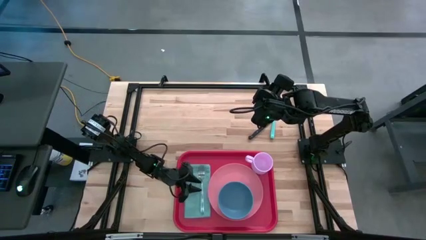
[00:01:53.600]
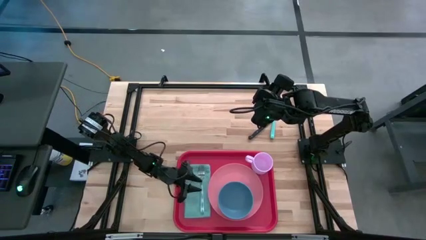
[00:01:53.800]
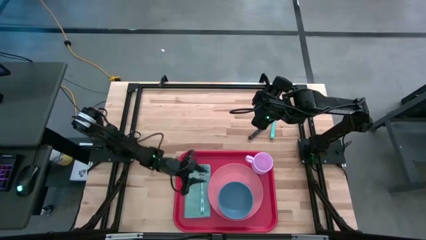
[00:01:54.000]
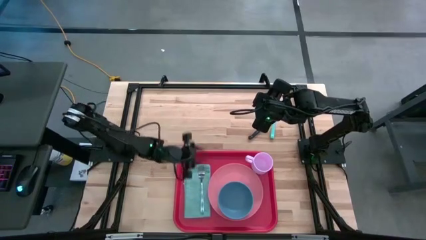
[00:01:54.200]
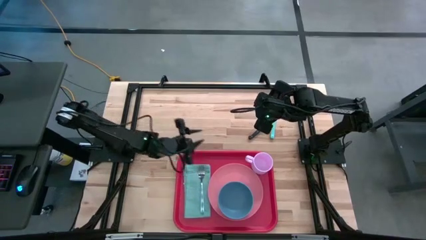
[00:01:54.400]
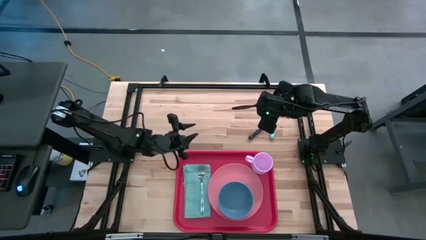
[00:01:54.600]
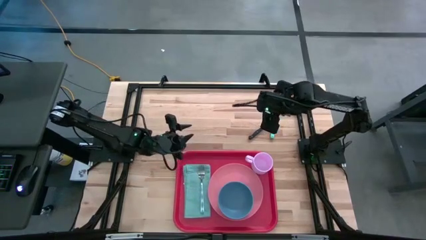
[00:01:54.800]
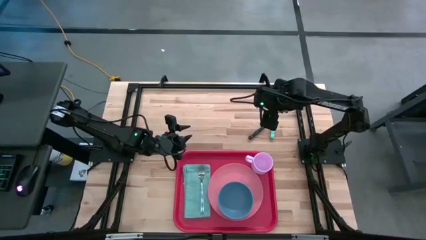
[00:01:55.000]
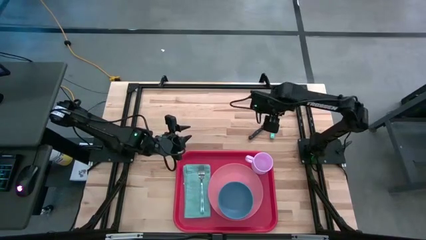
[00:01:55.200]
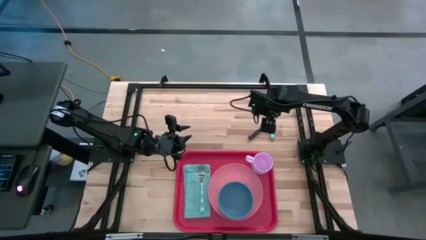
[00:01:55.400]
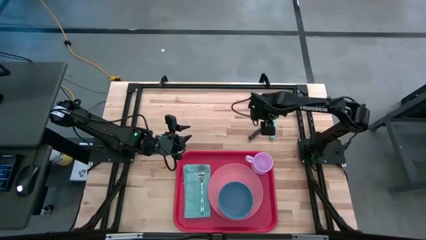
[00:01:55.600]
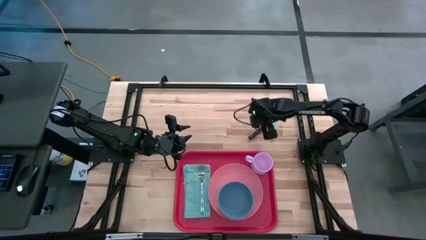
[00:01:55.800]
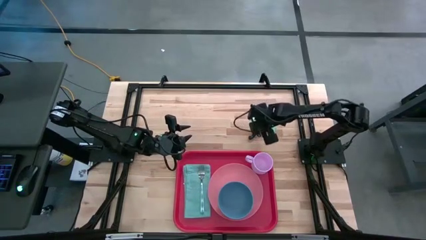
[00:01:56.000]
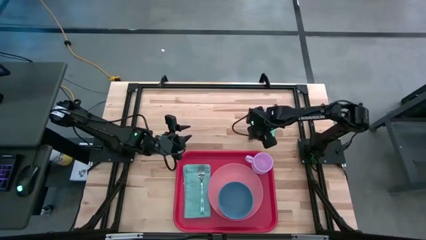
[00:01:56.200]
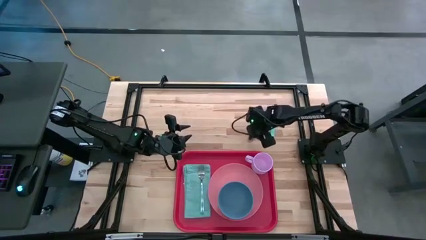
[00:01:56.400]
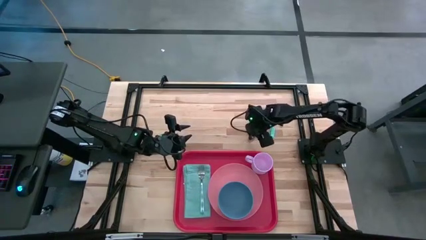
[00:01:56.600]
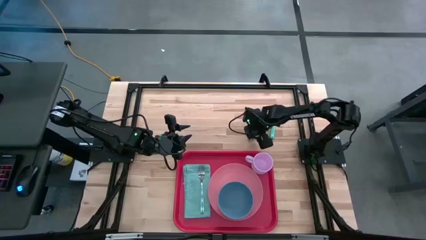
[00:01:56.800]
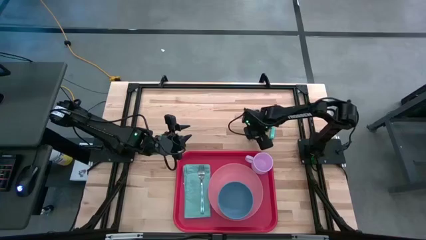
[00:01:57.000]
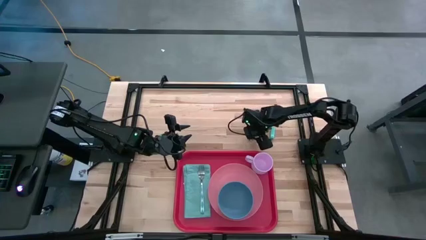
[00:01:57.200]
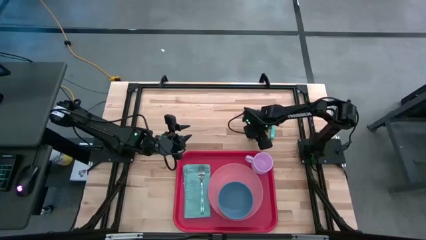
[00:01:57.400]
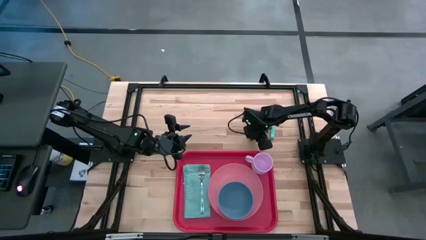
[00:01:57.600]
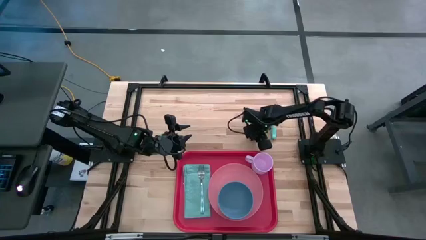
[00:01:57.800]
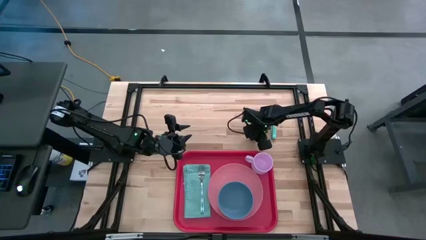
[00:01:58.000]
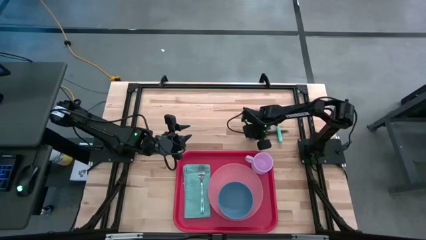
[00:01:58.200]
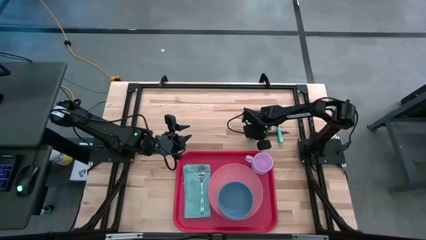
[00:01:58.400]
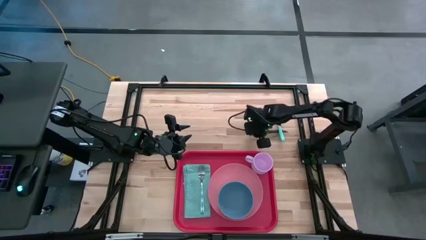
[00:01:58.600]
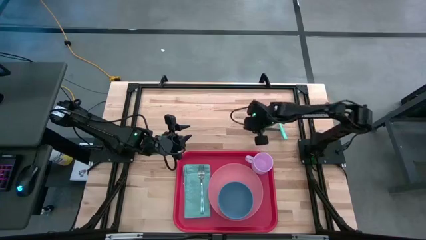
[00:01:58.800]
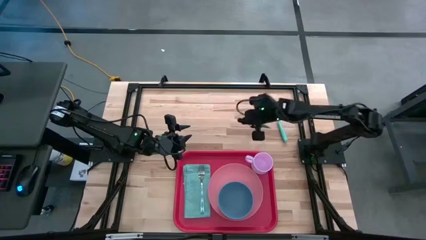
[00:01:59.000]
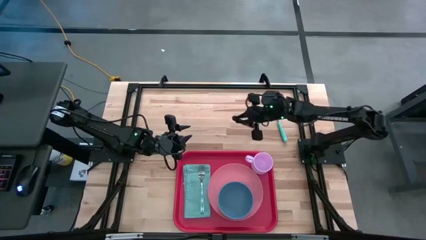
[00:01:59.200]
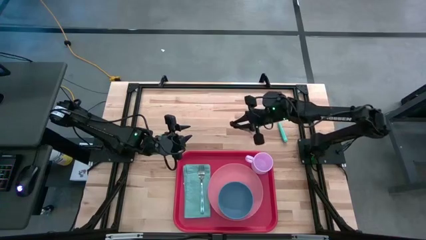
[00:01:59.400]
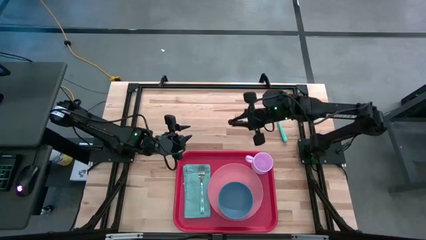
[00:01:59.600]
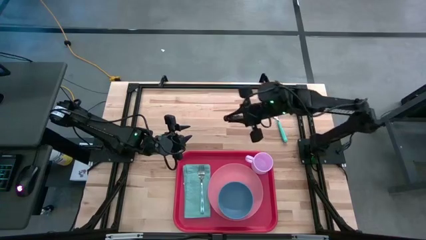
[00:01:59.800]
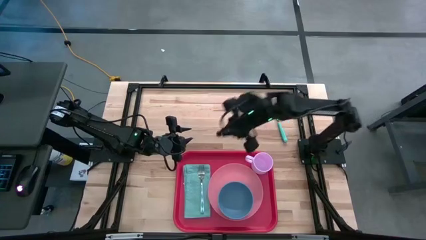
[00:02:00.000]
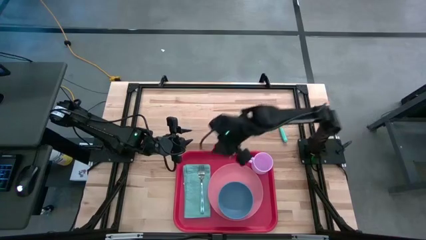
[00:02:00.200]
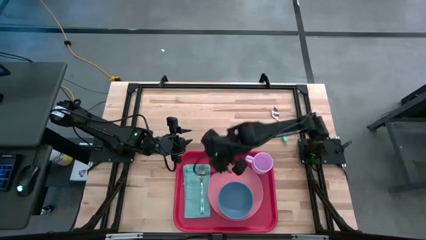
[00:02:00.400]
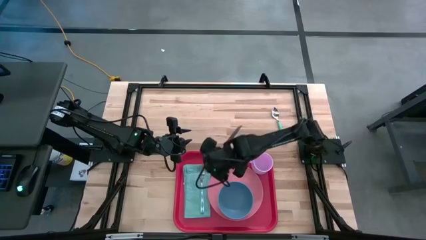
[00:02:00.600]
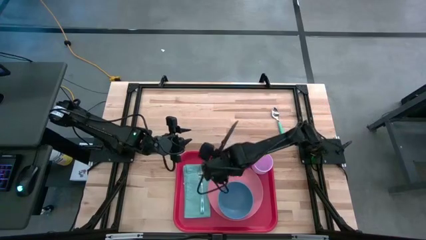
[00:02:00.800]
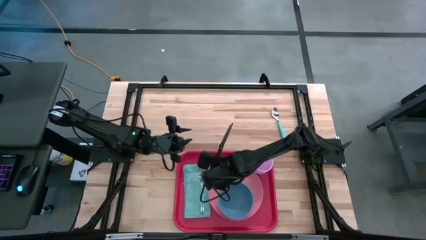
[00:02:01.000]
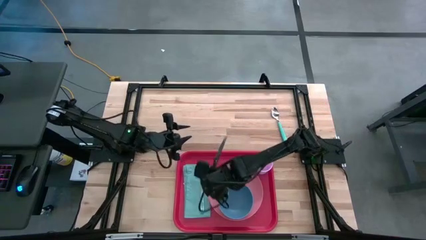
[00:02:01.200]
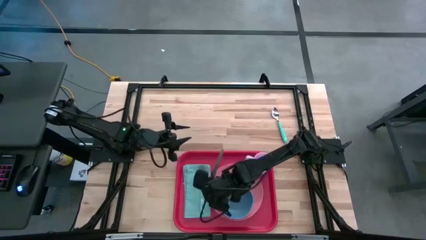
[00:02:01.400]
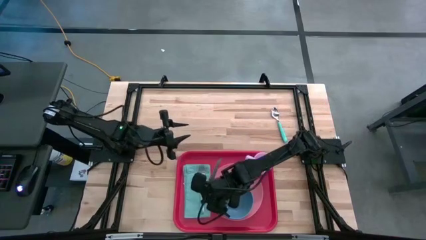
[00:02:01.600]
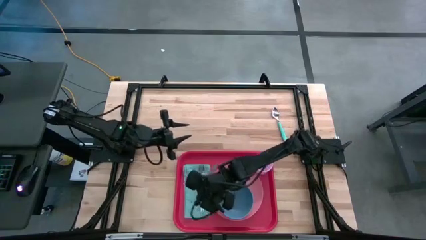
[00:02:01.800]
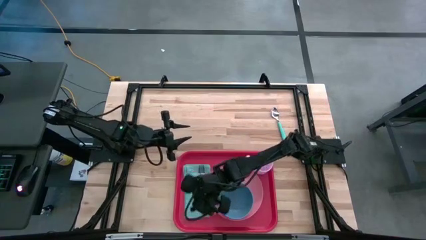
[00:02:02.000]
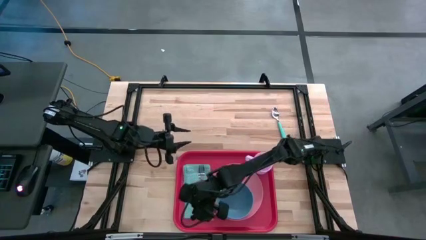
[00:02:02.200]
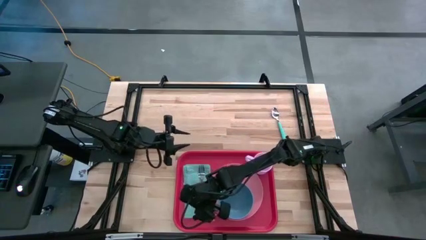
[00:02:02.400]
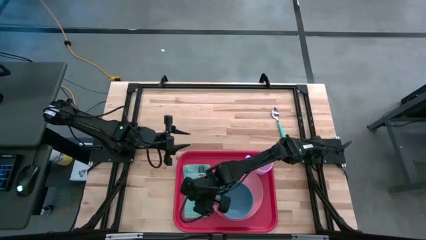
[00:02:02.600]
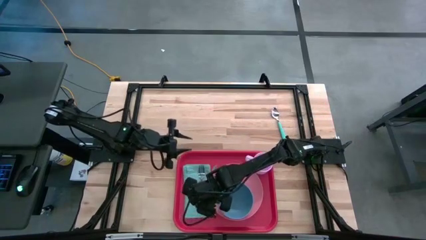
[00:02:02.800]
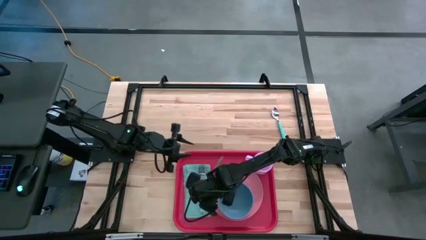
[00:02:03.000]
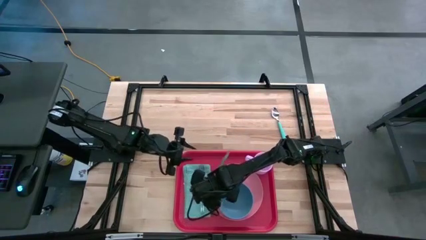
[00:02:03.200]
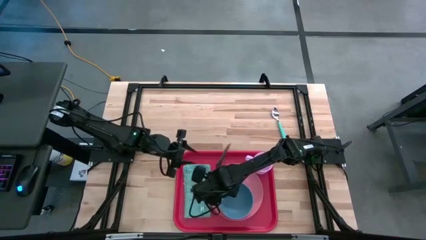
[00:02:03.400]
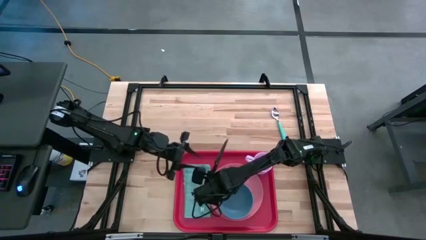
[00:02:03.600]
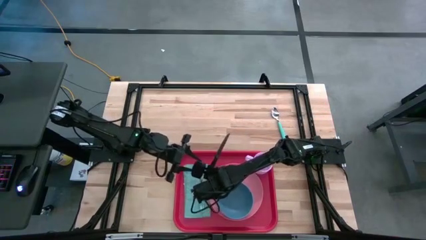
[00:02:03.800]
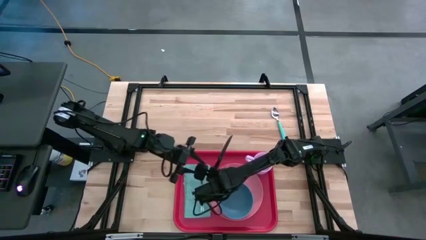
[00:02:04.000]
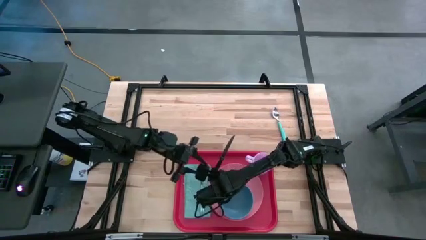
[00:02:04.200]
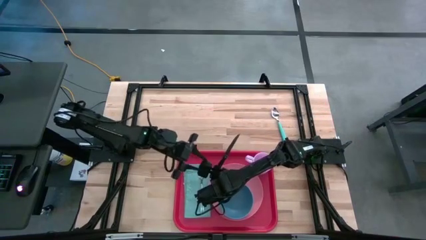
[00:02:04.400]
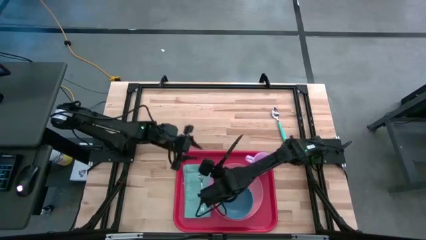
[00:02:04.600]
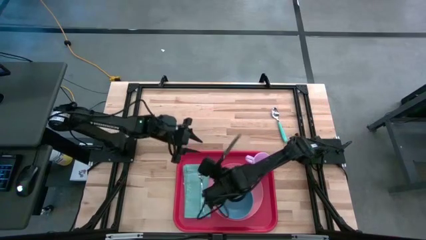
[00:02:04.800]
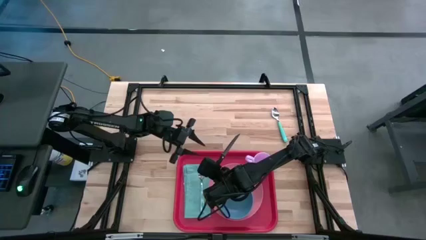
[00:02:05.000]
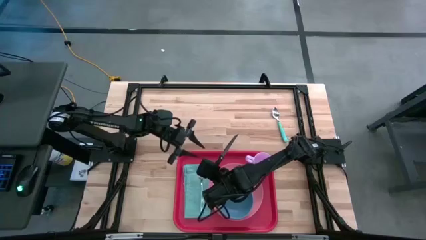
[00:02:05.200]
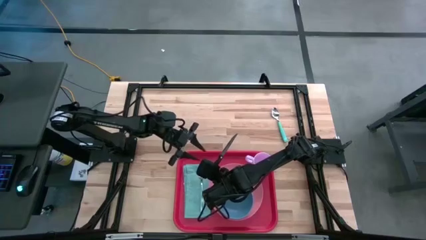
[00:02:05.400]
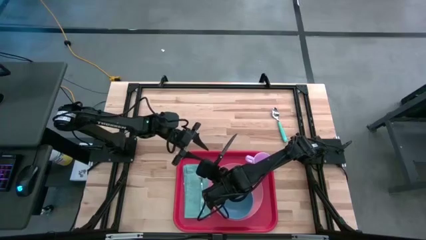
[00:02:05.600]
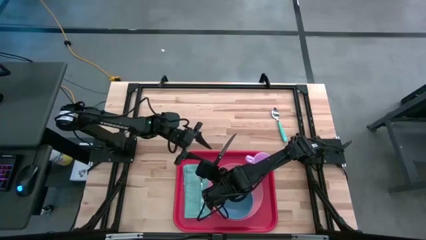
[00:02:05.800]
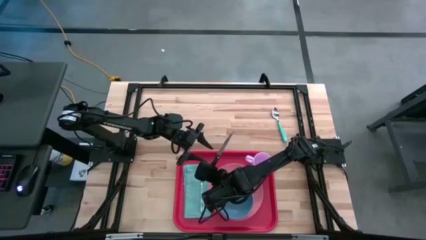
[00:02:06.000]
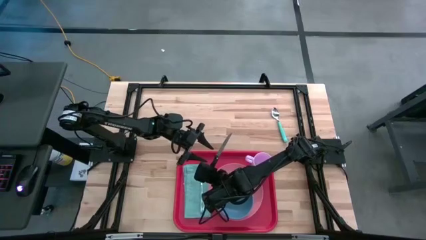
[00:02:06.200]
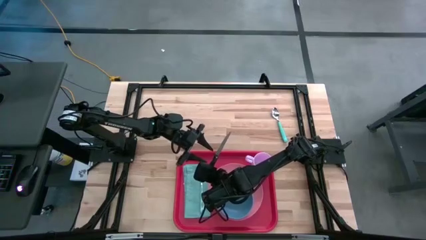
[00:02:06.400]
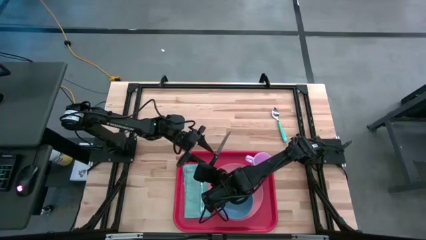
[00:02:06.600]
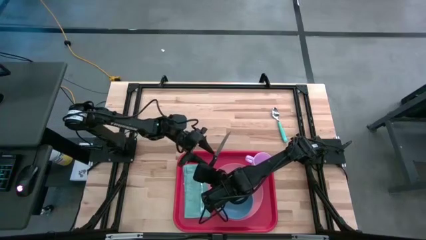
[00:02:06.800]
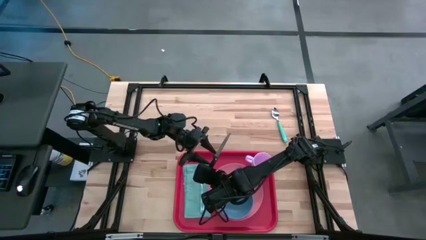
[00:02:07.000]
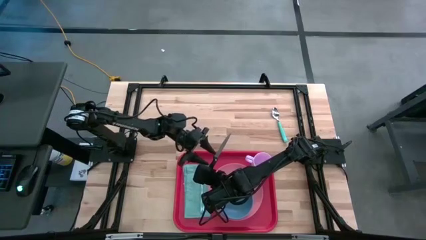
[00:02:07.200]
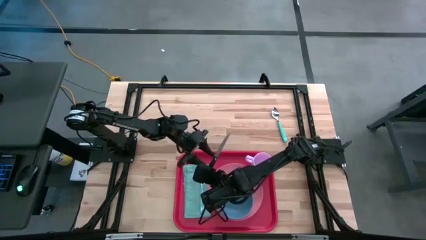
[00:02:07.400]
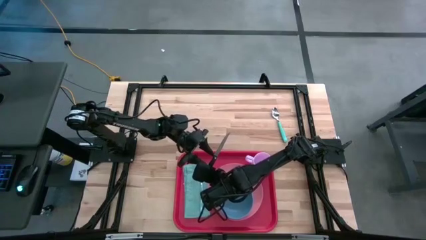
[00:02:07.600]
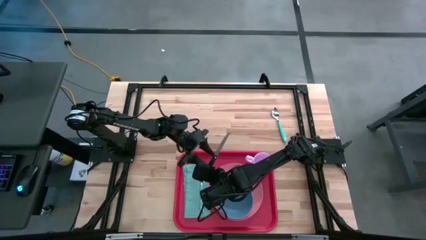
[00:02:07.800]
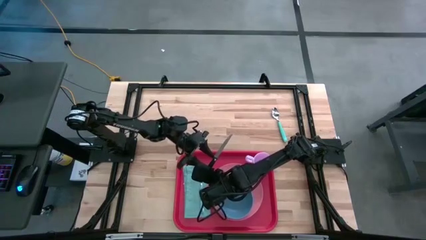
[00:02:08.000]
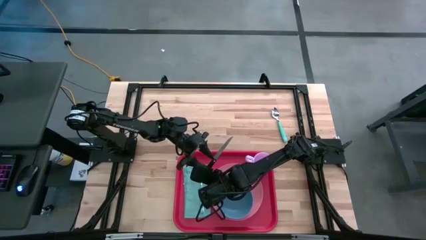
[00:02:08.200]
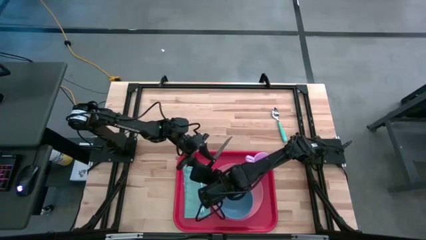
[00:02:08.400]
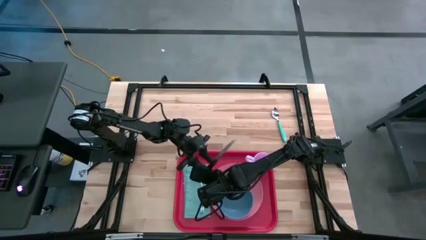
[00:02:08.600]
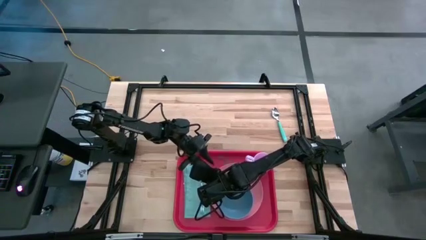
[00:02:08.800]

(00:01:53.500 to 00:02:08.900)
Task: Set up tray
Put the black knife on the blue napkin
